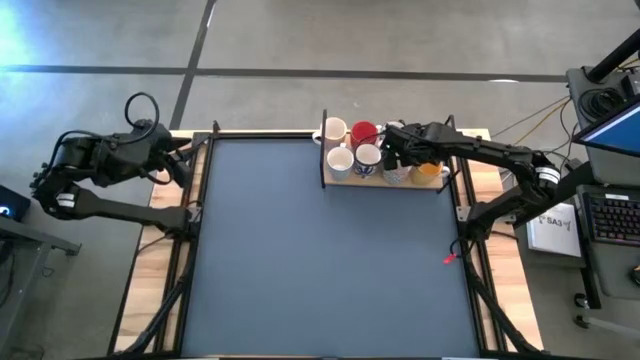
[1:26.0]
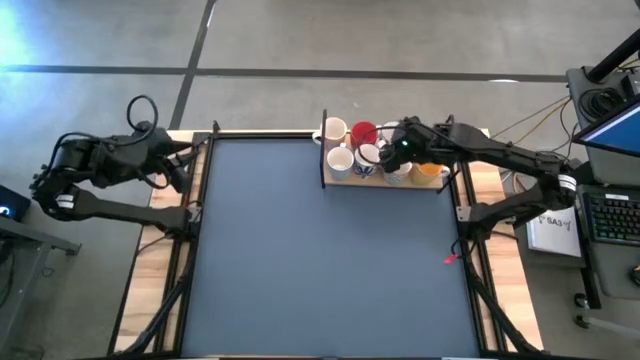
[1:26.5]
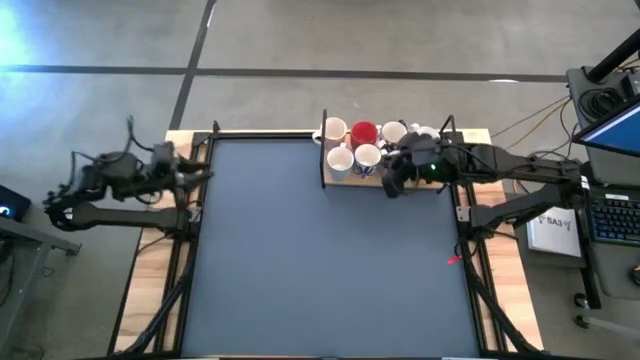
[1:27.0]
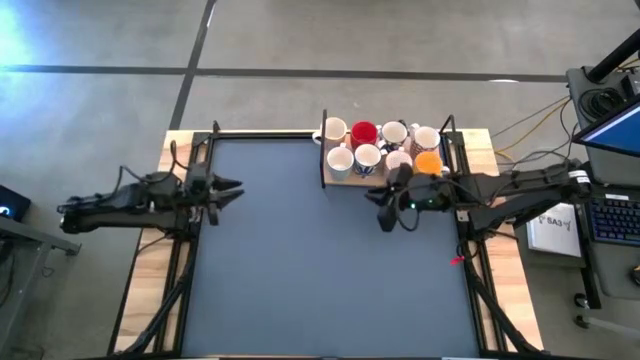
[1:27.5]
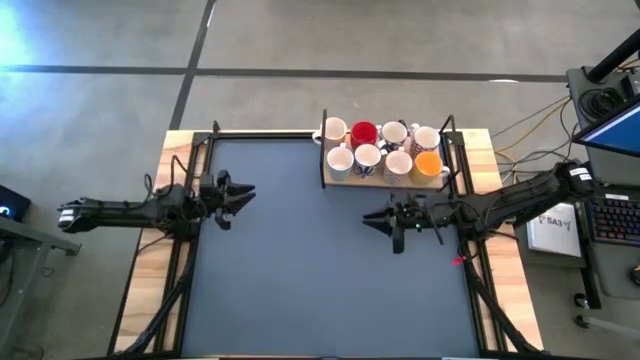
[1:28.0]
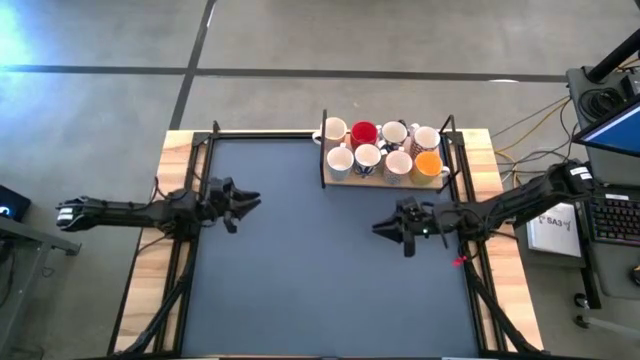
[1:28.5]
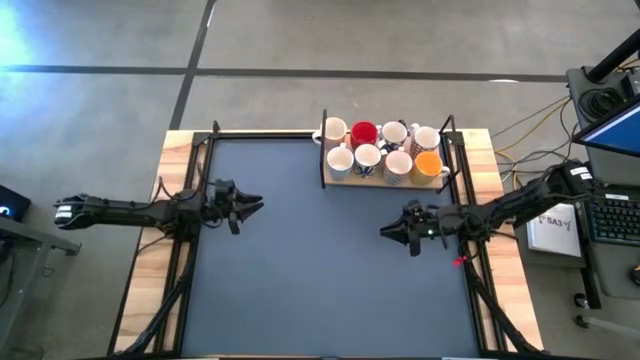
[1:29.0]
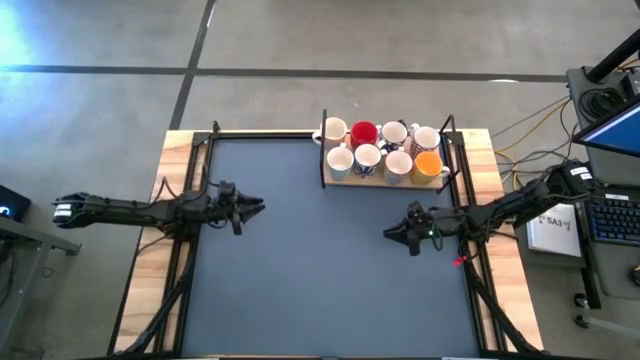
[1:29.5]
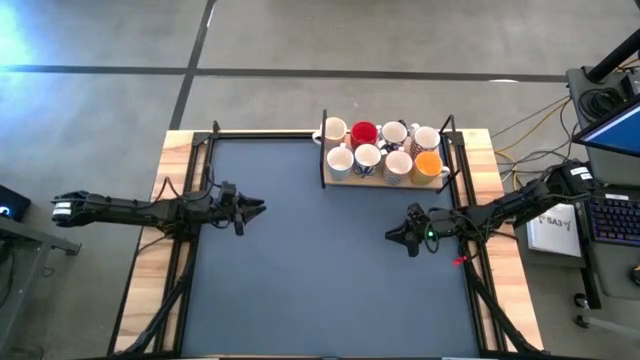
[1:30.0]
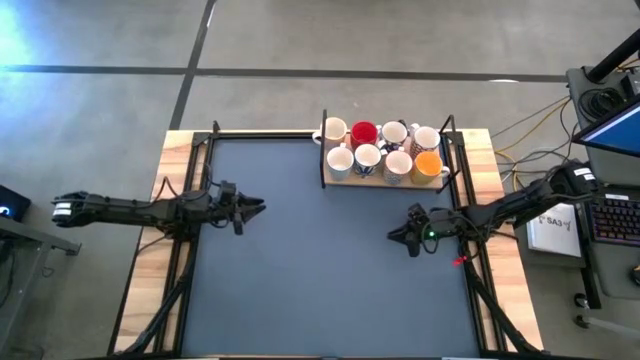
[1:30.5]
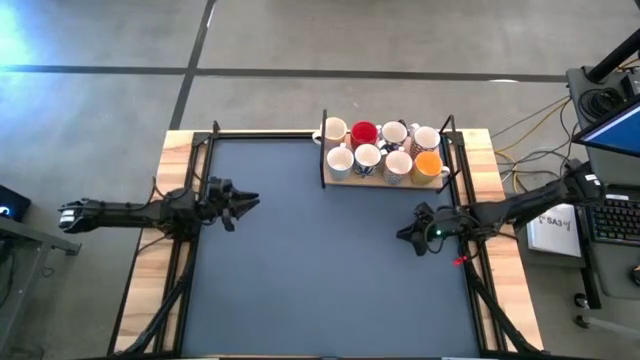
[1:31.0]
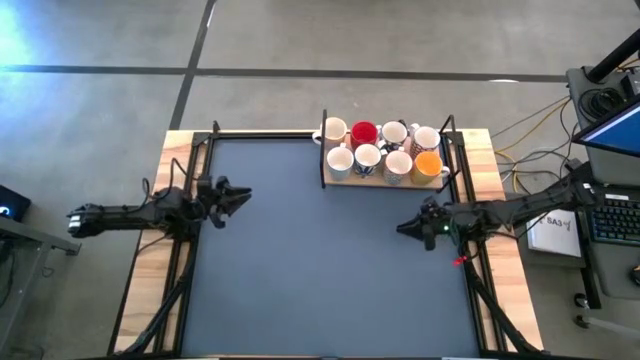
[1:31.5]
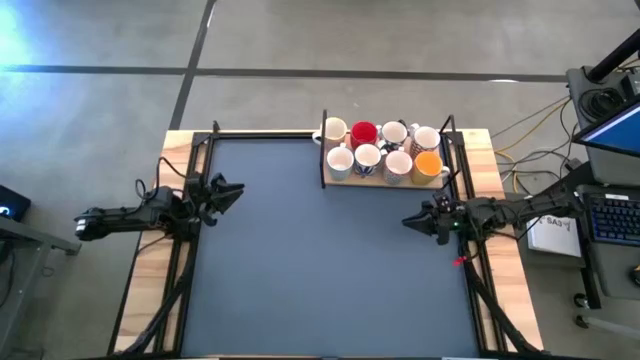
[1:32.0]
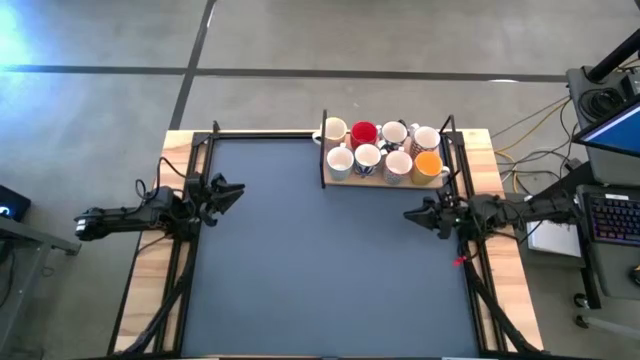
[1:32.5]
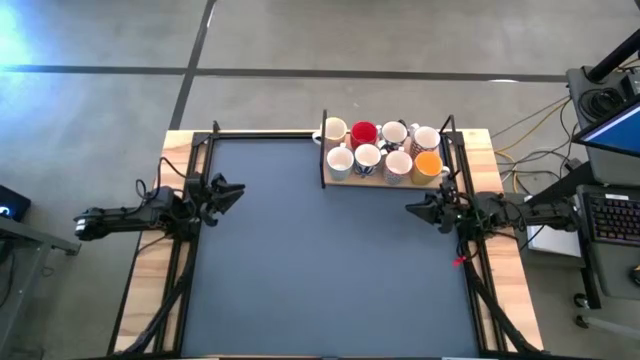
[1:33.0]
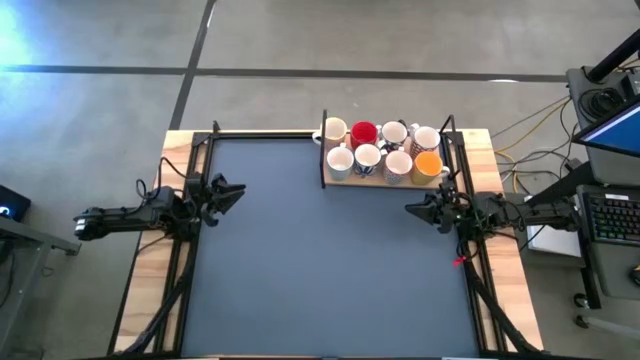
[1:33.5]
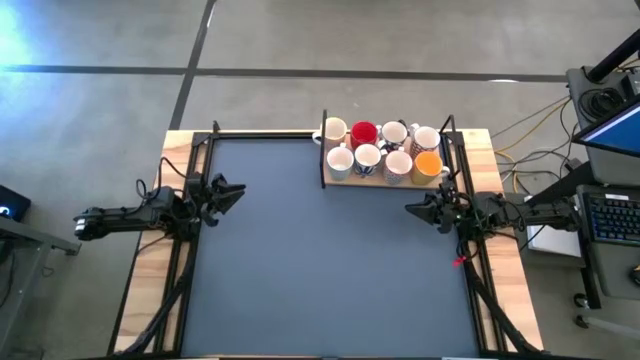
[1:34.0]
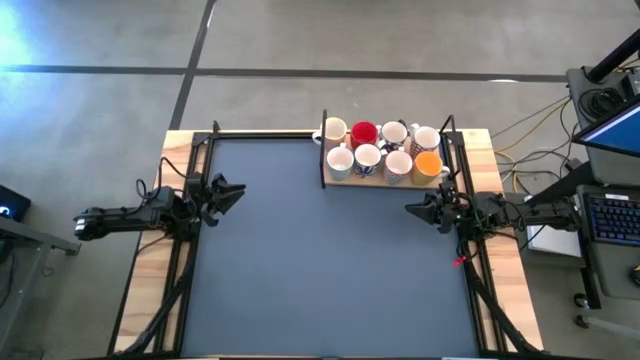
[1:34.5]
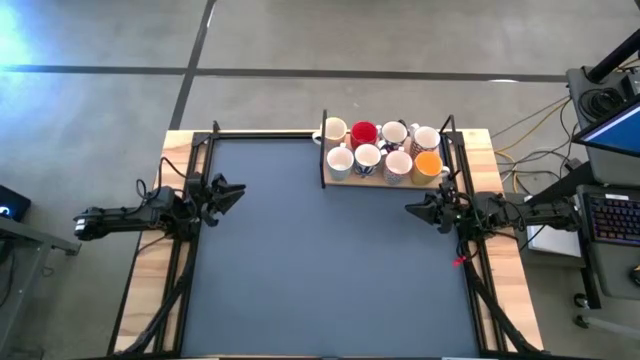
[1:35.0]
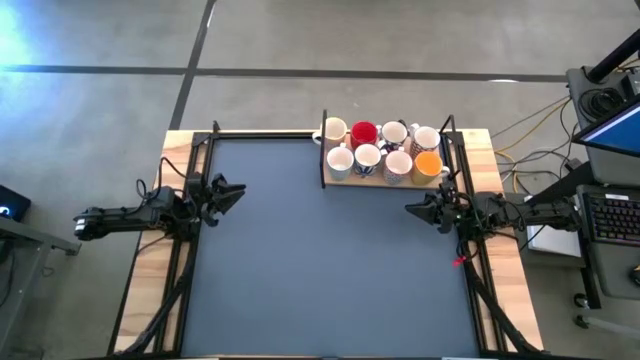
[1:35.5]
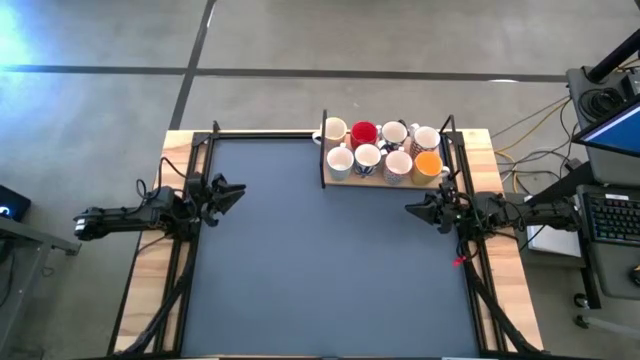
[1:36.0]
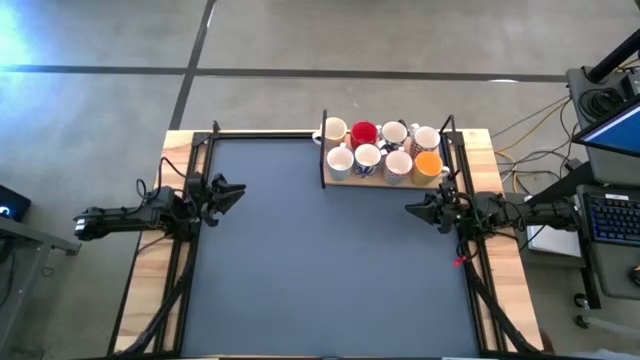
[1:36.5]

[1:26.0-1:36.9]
Task: Place coffee mugs
Return to Home Position

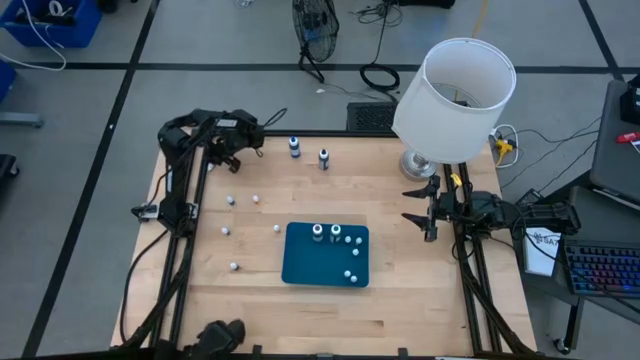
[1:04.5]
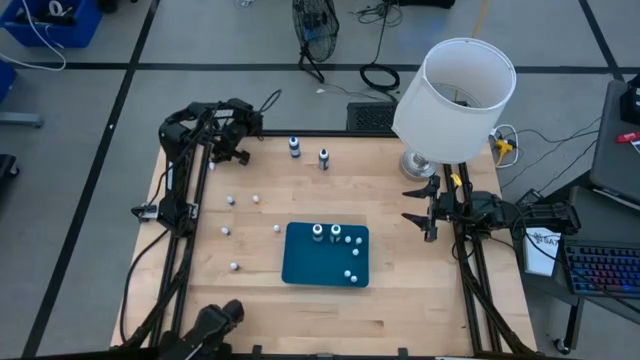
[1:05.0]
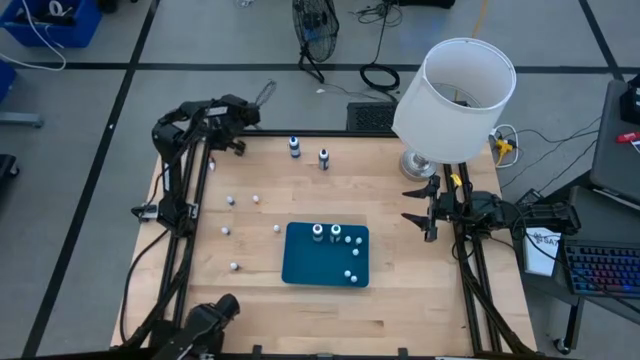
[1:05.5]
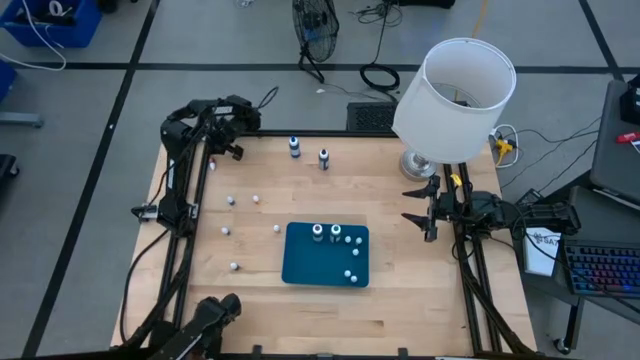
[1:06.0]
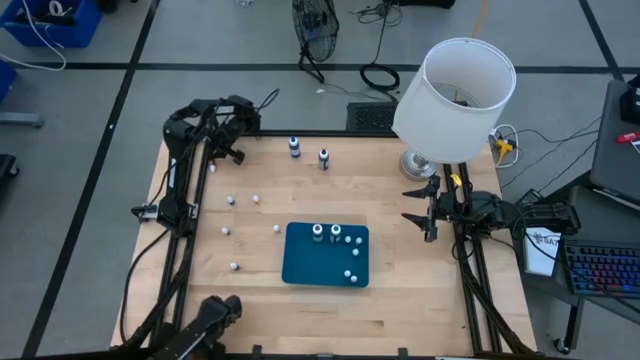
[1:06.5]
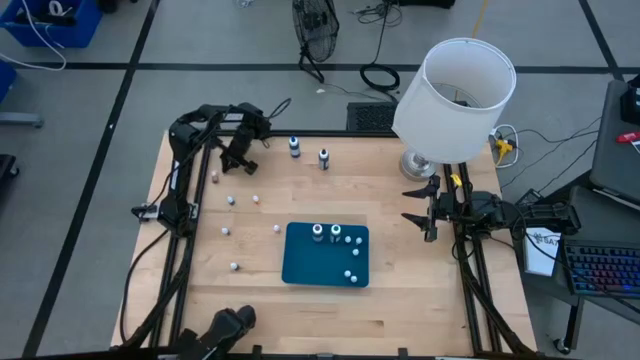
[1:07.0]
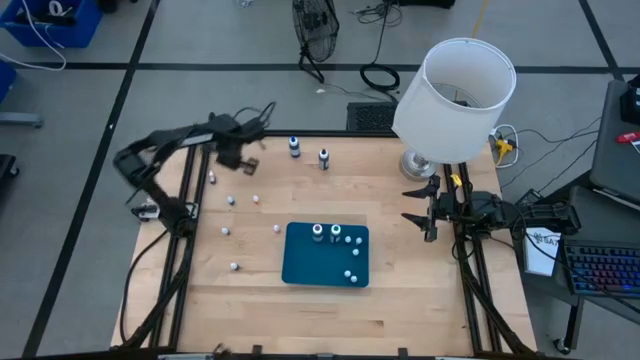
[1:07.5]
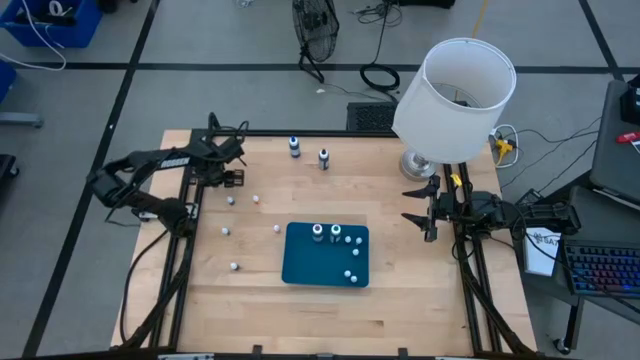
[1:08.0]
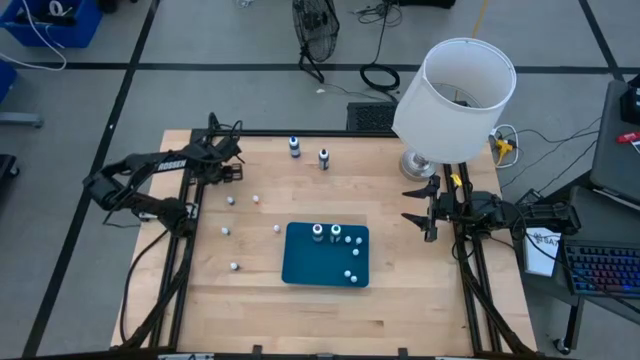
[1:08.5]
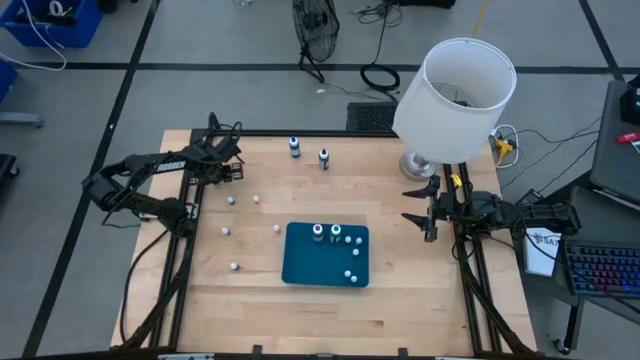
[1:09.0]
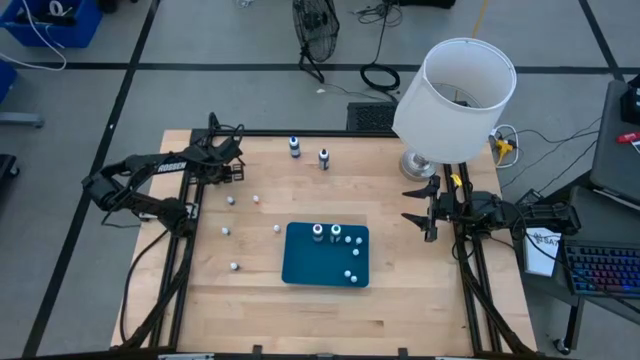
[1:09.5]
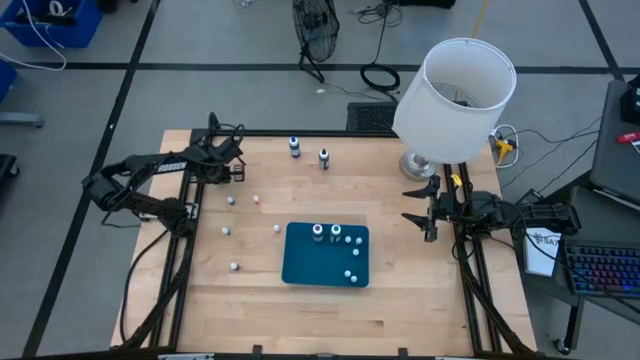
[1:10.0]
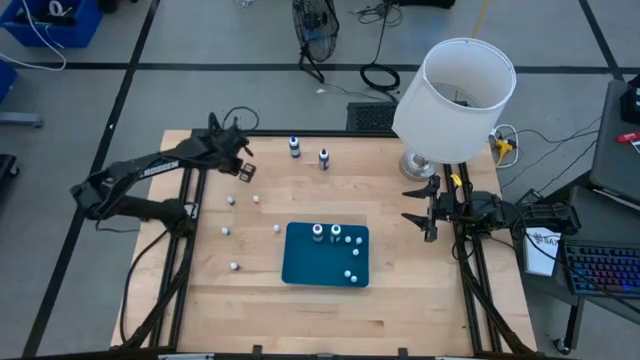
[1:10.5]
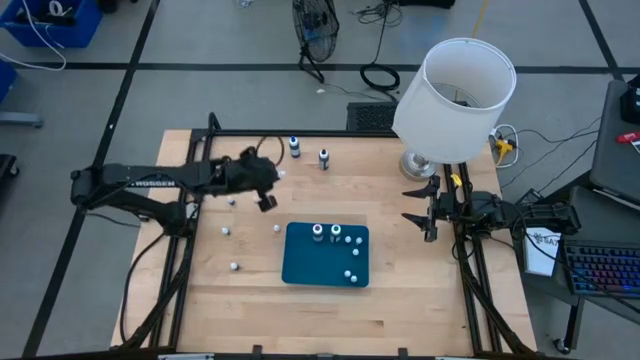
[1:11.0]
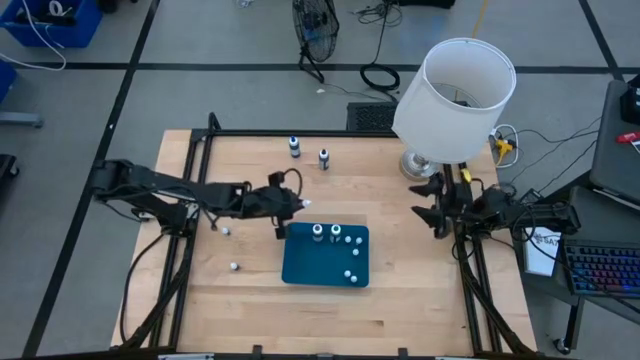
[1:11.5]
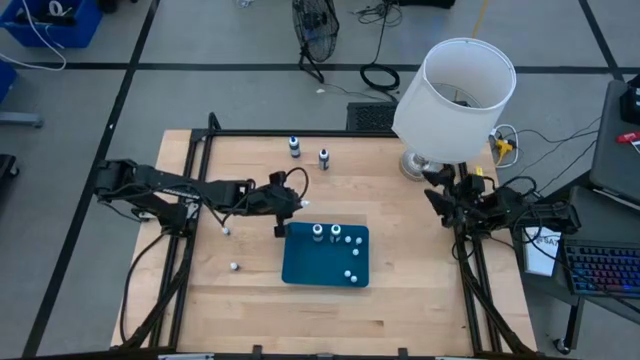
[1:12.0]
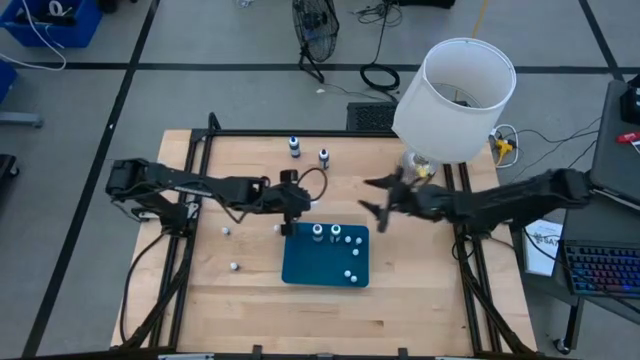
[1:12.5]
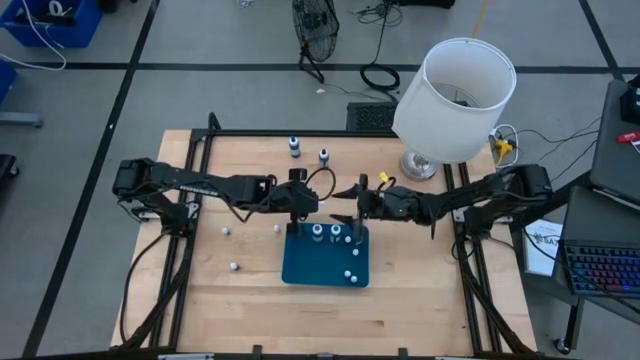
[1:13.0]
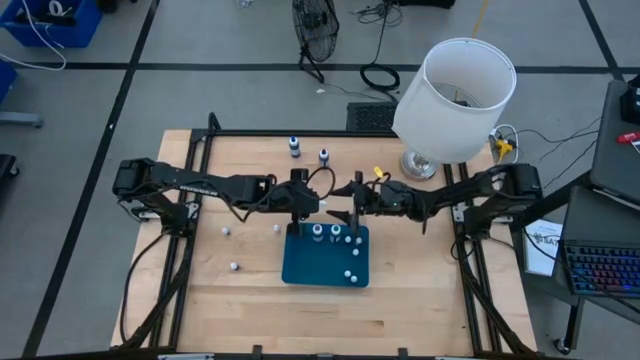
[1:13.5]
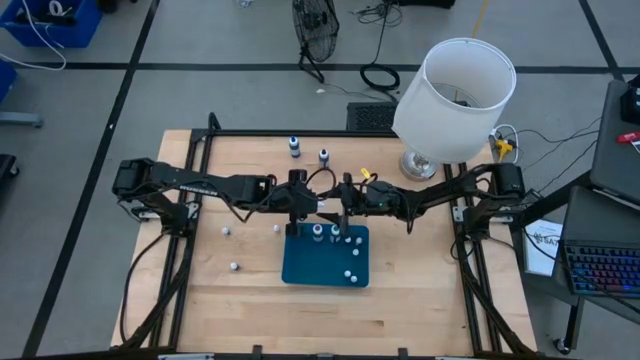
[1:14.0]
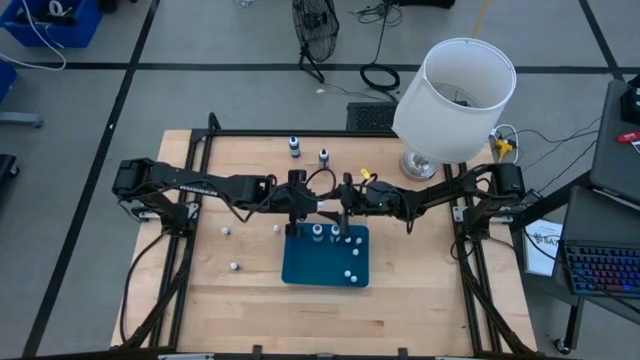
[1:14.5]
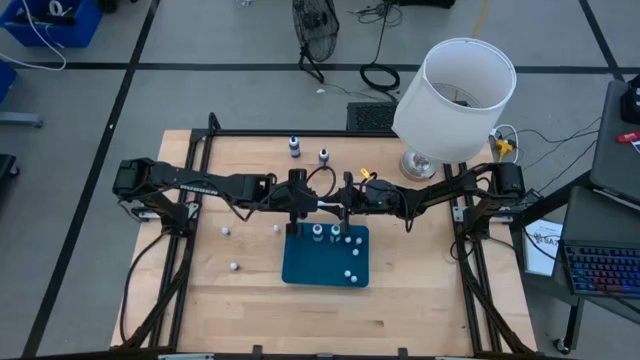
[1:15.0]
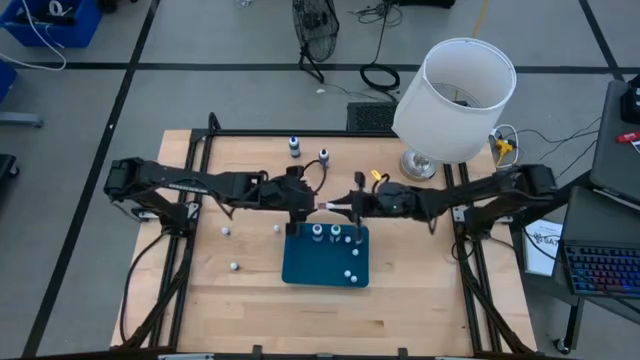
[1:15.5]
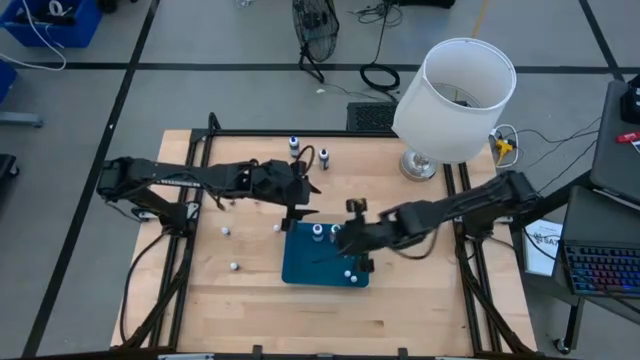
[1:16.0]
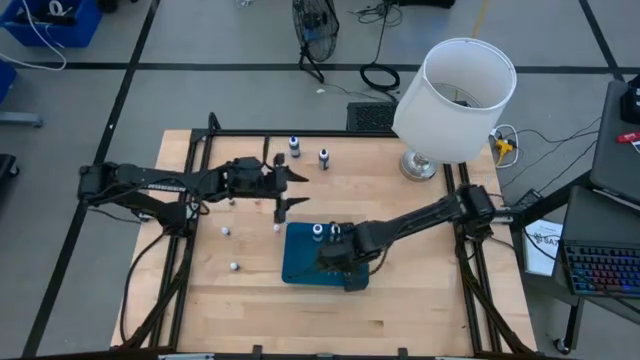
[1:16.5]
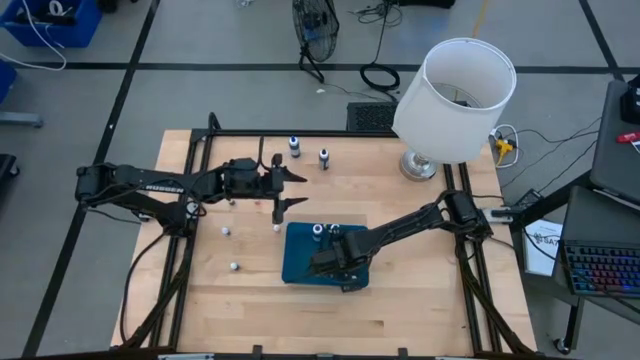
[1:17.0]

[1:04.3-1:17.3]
Task: Pick & Place food coloring
Put the small red food coloring bottle into the blue bin
